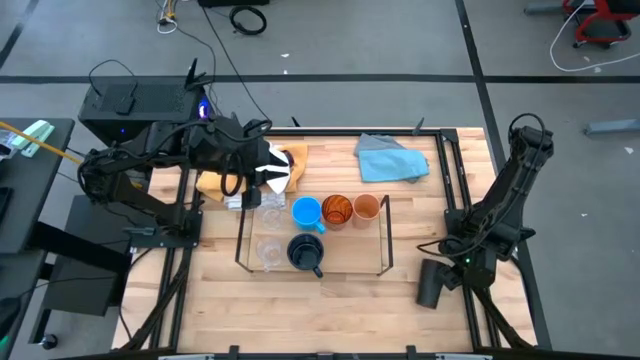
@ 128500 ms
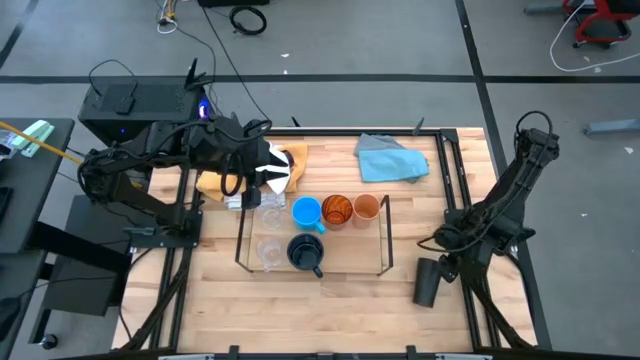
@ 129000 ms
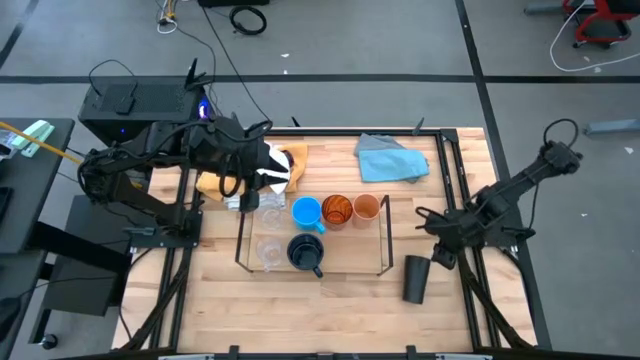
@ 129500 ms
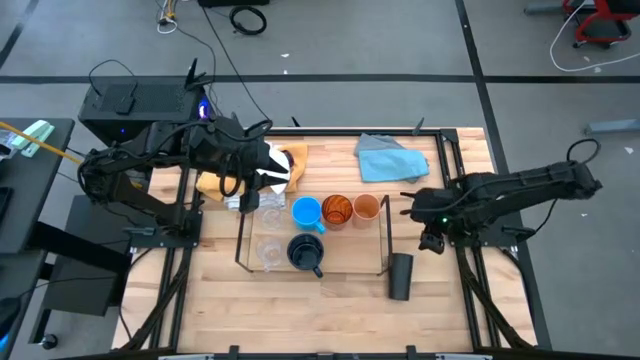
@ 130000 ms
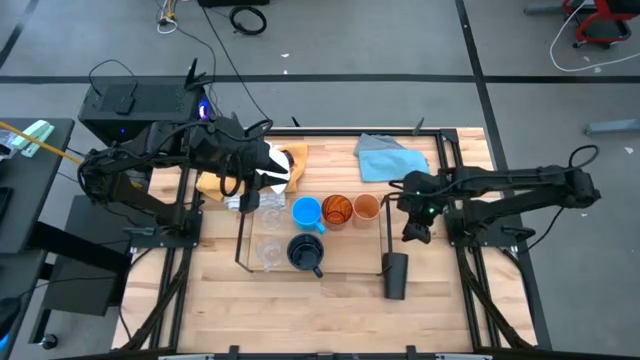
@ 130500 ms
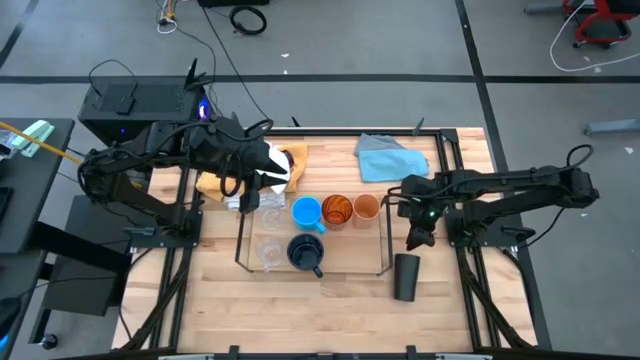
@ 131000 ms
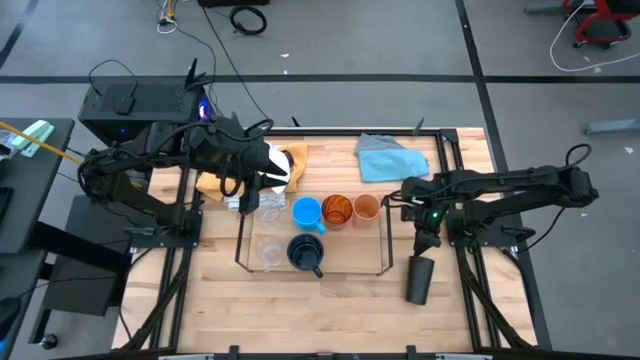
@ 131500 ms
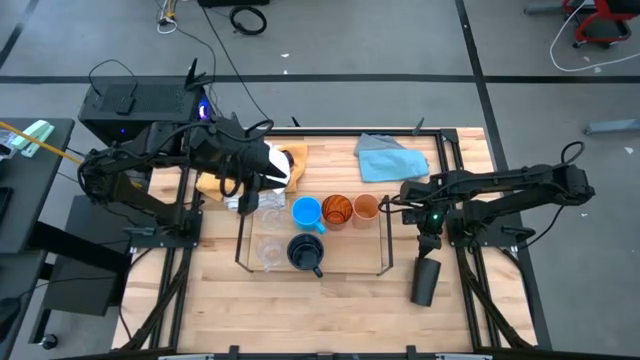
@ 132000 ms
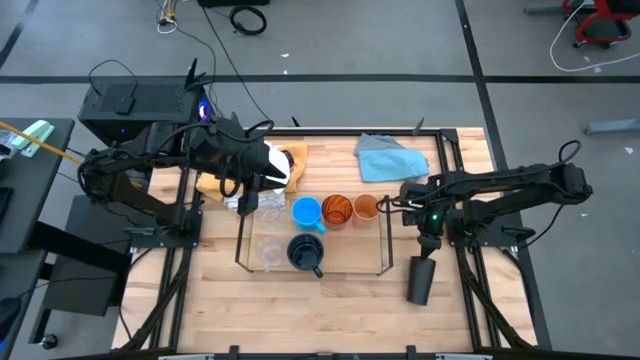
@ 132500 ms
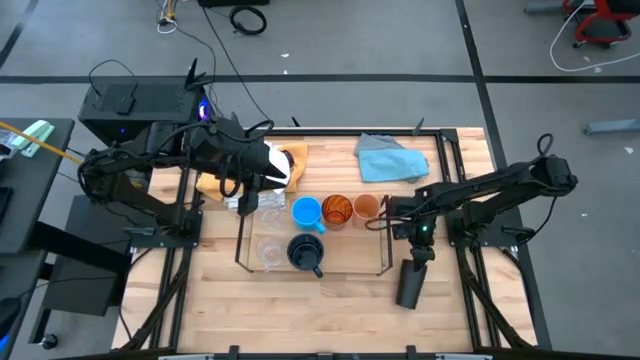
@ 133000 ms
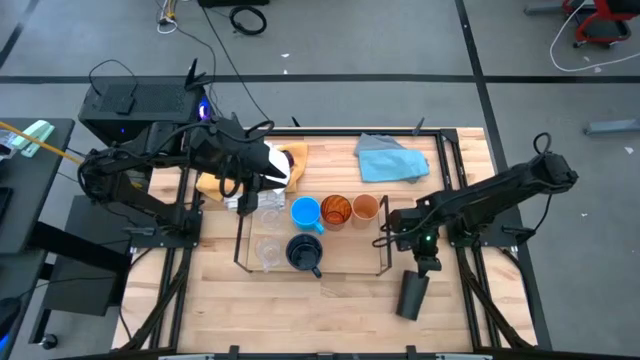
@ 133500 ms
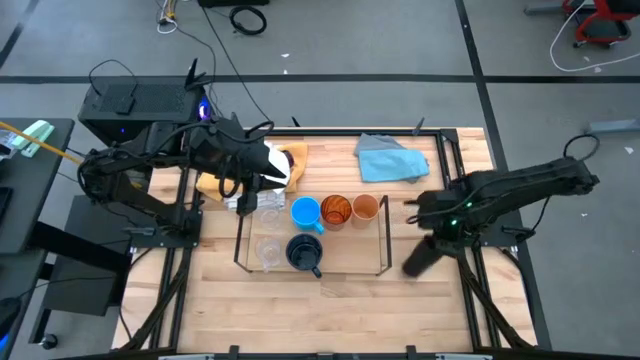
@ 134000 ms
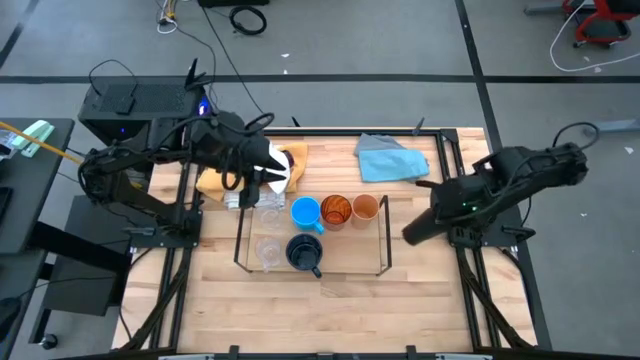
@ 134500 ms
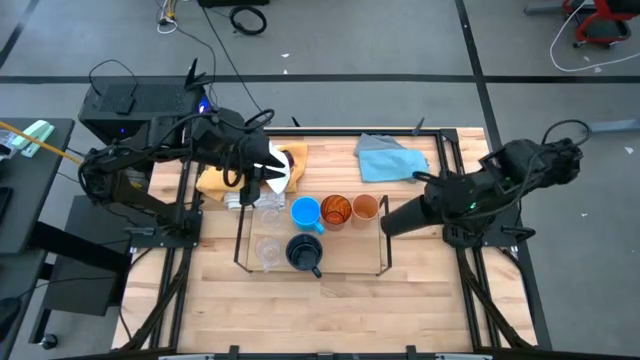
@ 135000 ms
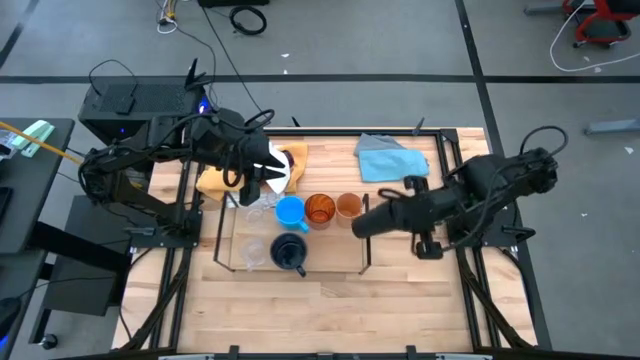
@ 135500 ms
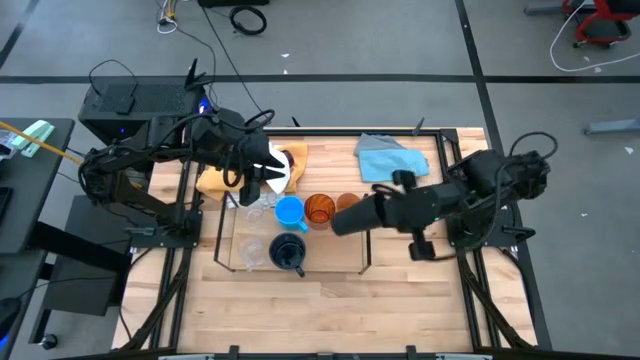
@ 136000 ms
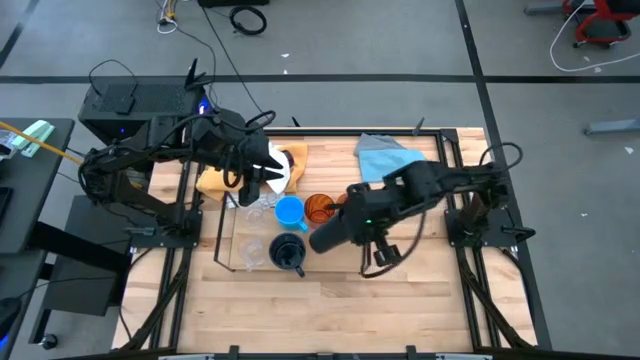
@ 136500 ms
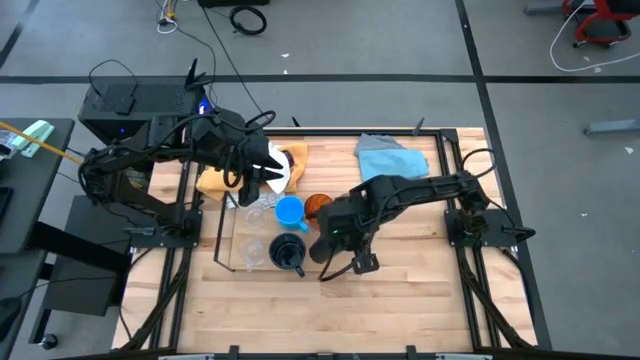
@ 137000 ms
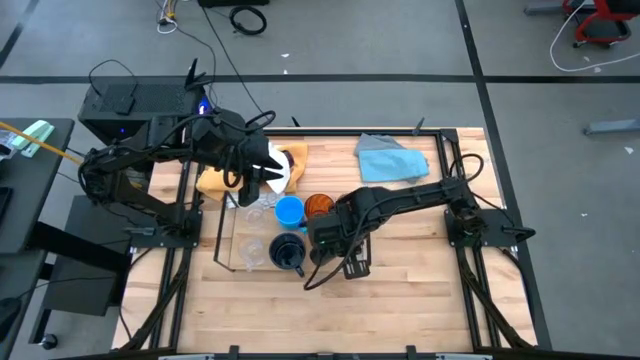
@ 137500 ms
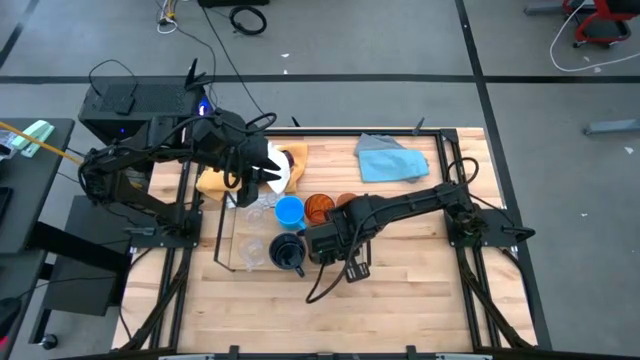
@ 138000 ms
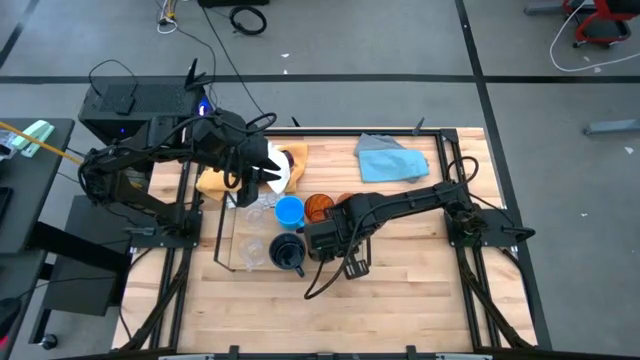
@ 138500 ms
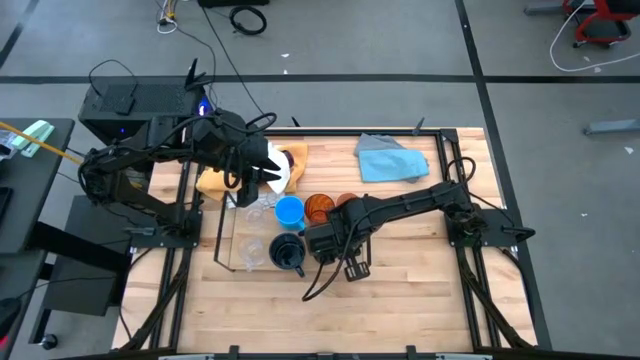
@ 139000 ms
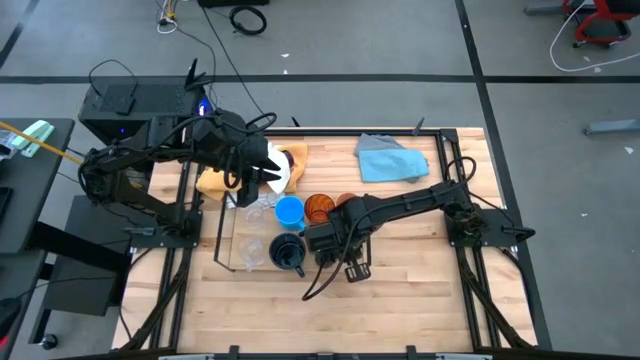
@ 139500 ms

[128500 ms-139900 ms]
Task: Stack small to large cups/mugs on shelf
Put the black cup on the shelf

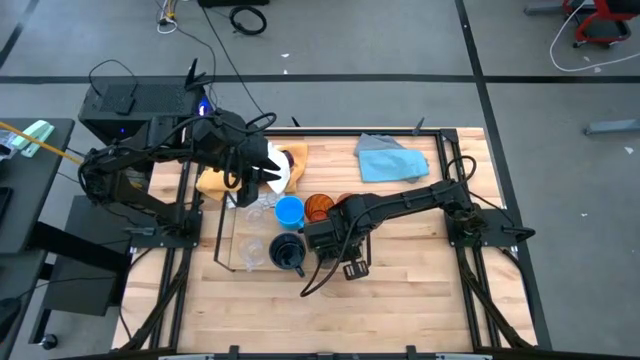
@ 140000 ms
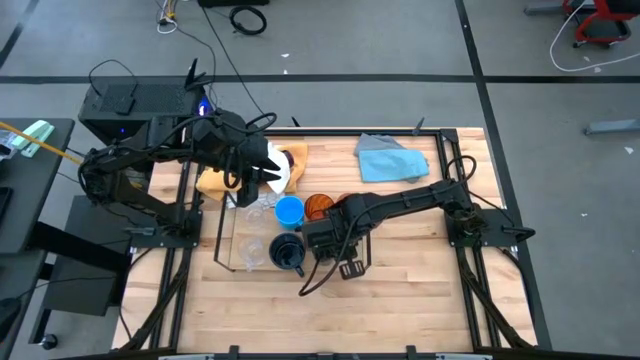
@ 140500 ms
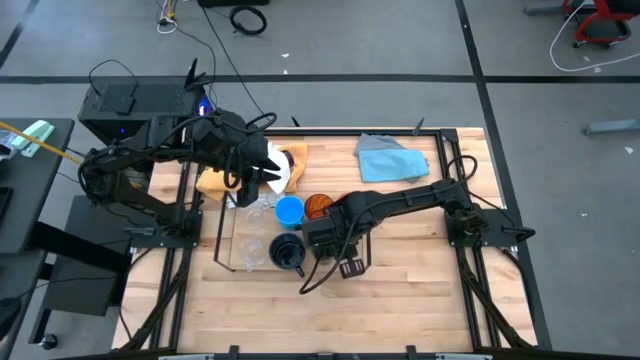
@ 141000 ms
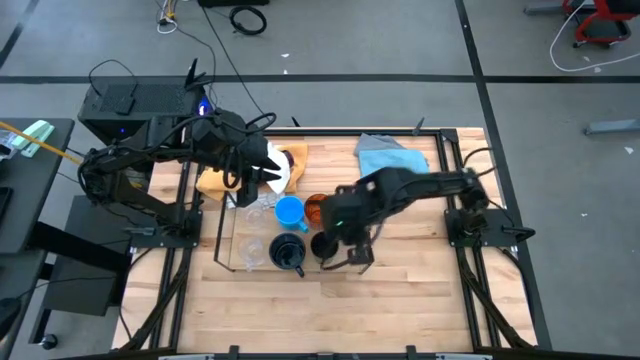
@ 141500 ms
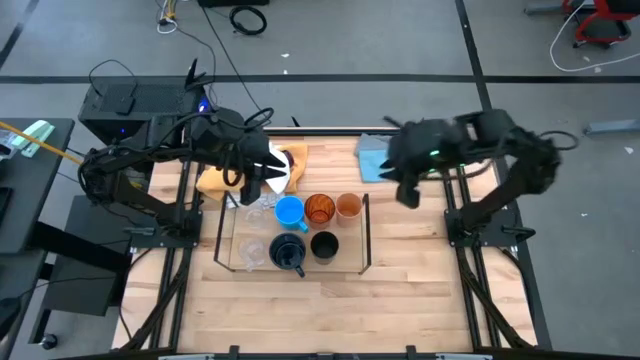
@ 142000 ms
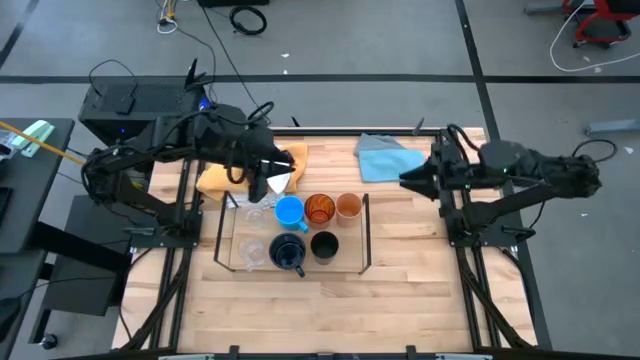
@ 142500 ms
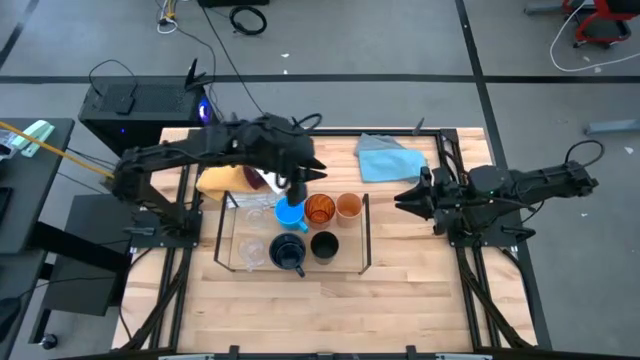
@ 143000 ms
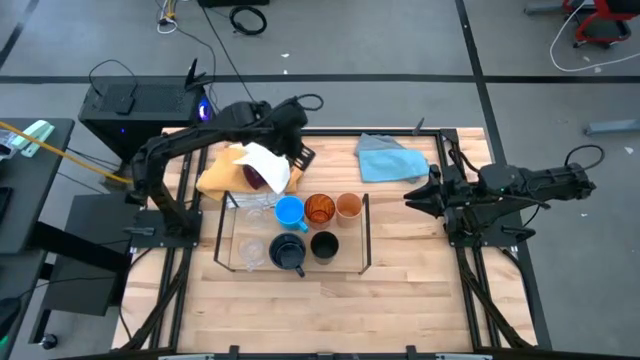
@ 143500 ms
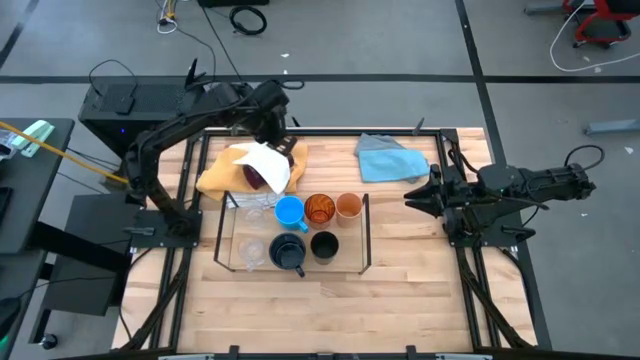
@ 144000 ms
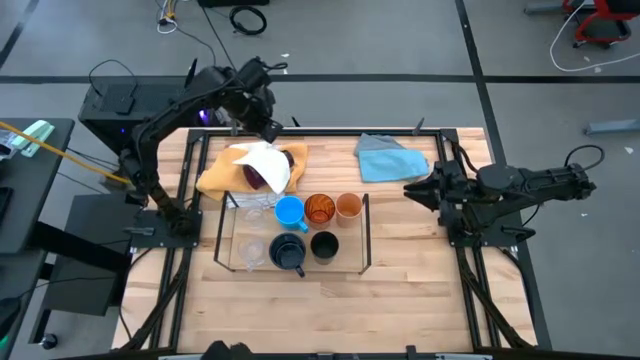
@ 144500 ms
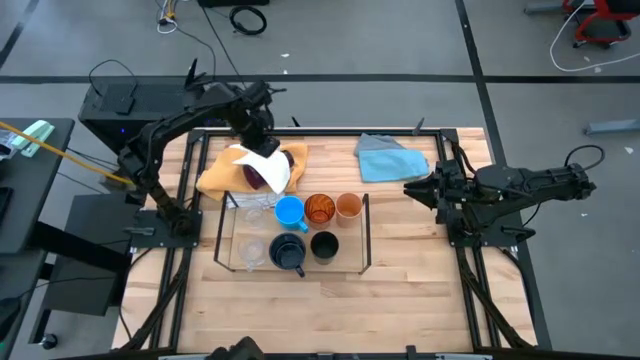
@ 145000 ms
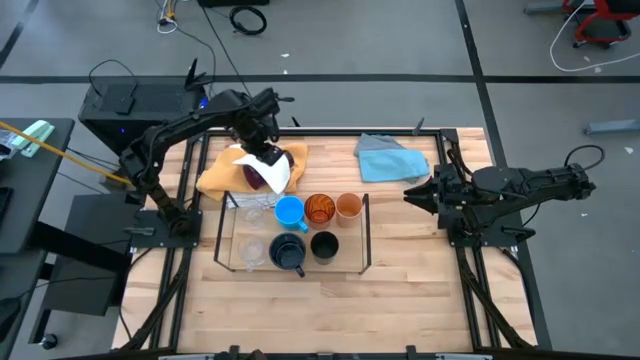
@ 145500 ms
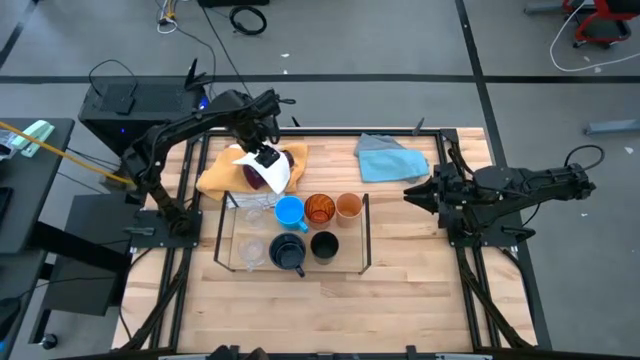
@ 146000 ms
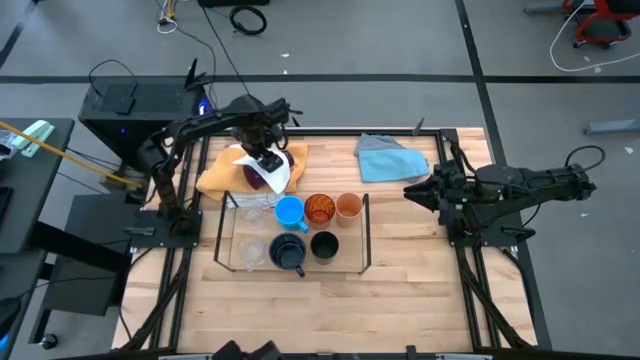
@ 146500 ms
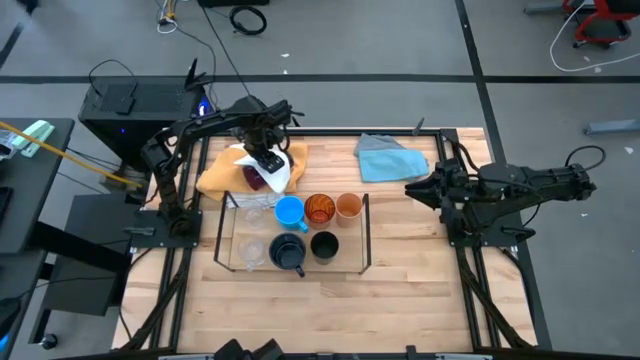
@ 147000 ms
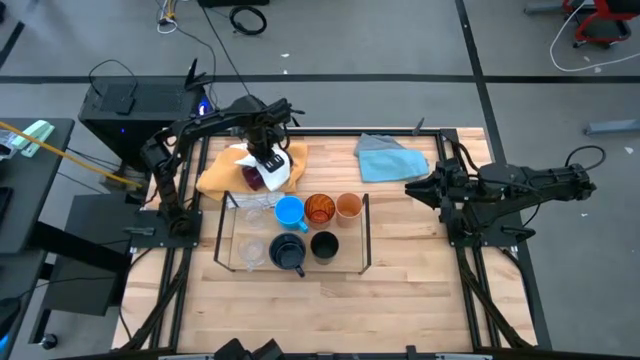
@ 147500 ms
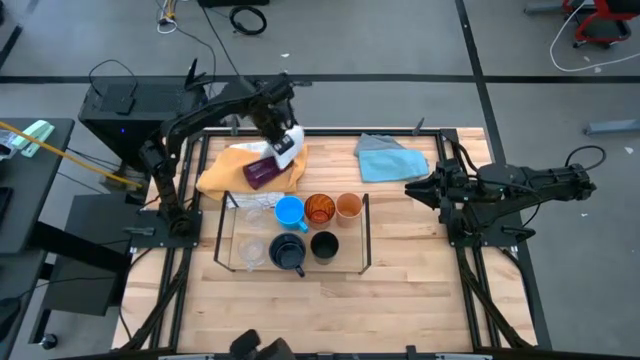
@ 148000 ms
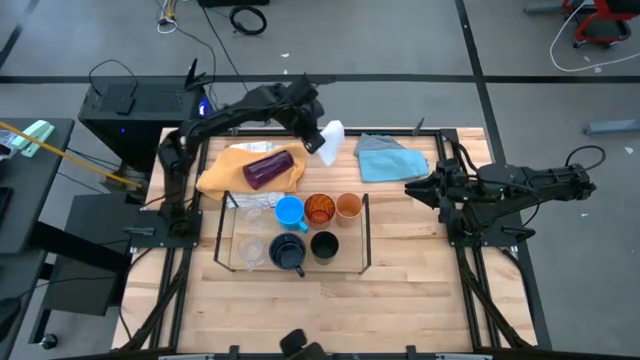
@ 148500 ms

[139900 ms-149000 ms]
Remove the white towel from the top of the purple cup

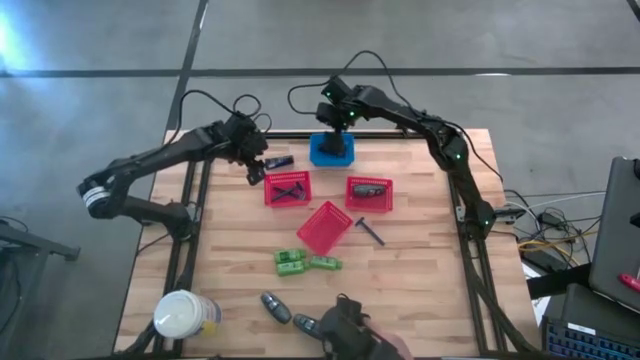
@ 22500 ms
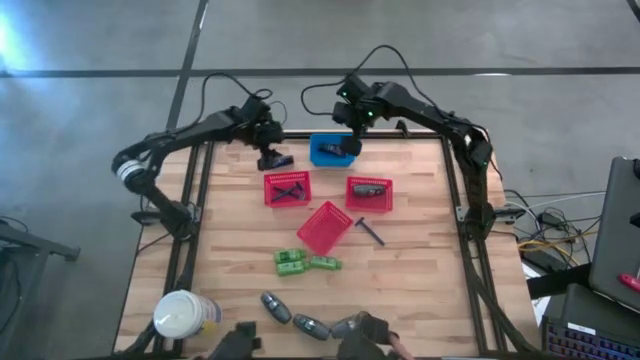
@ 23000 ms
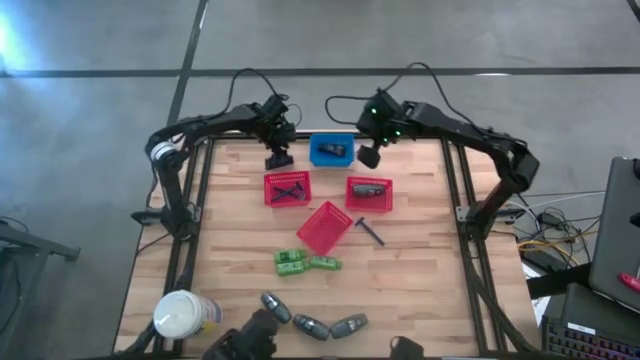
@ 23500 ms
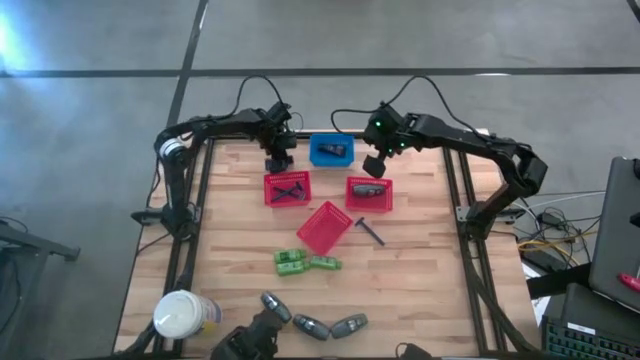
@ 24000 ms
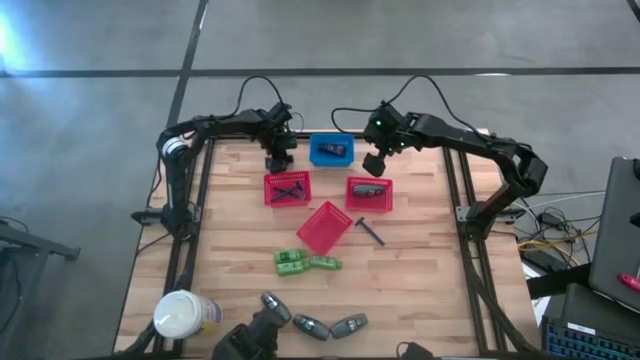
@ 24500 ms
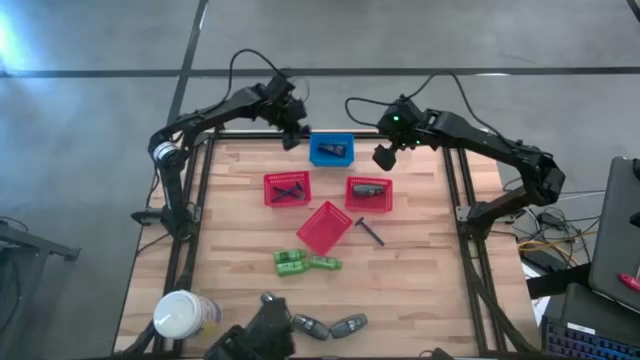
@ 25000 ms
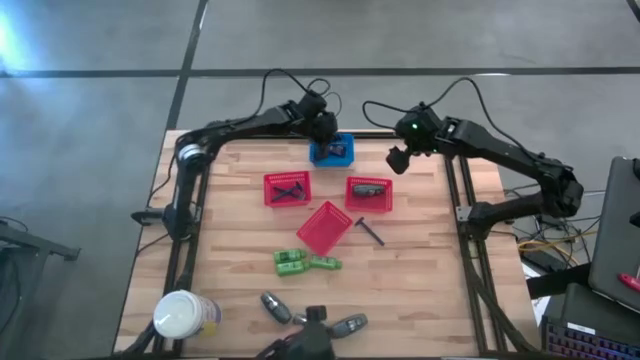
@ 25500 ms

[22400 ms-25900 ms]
Task: Pick & Place Travel size toiletries
Put the dark blue shaving cream into the blue bin
